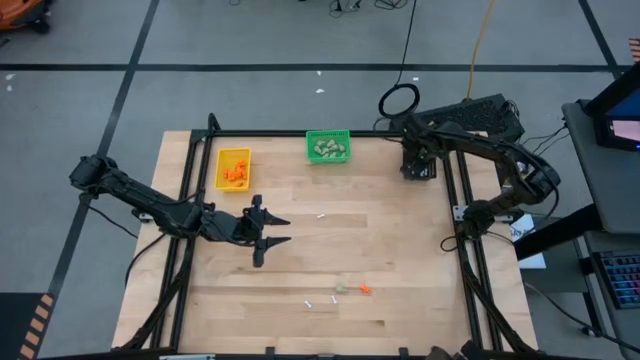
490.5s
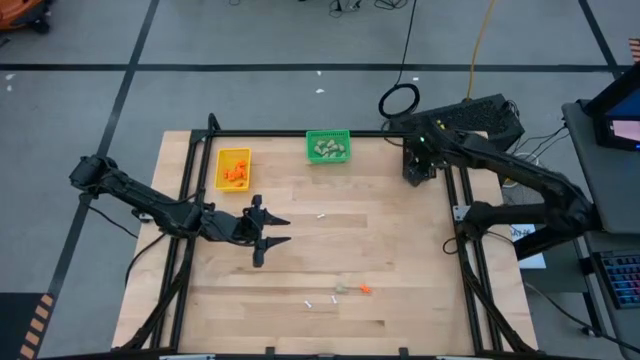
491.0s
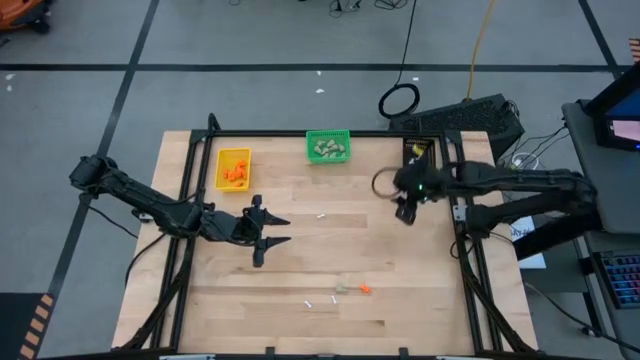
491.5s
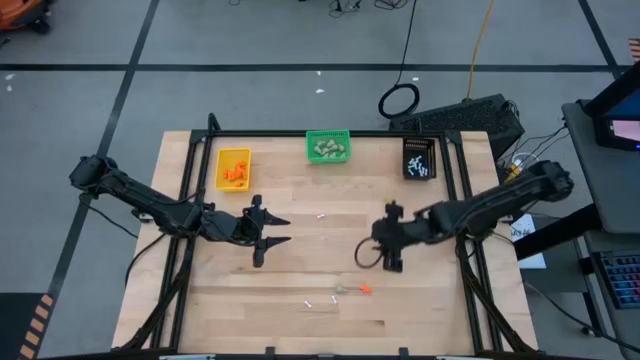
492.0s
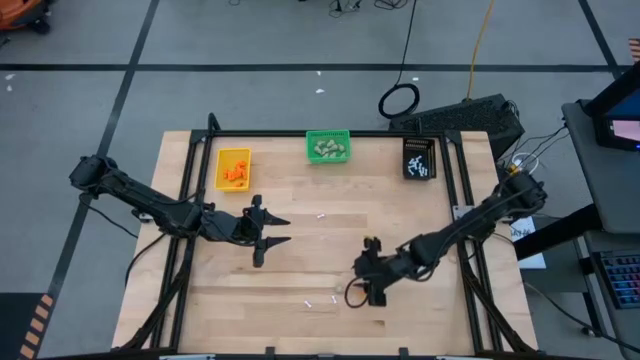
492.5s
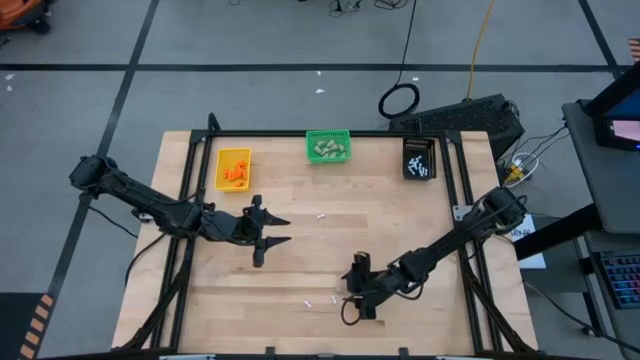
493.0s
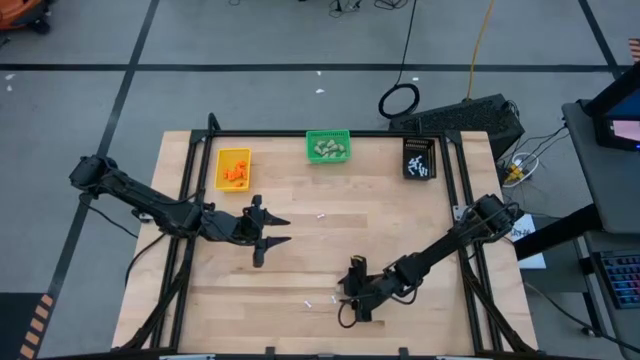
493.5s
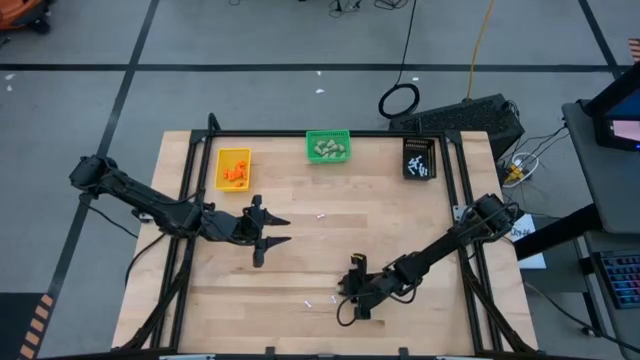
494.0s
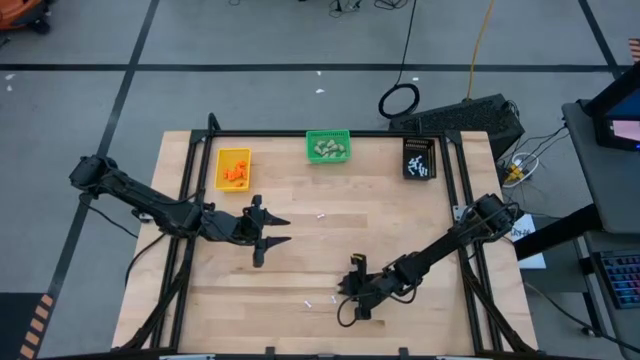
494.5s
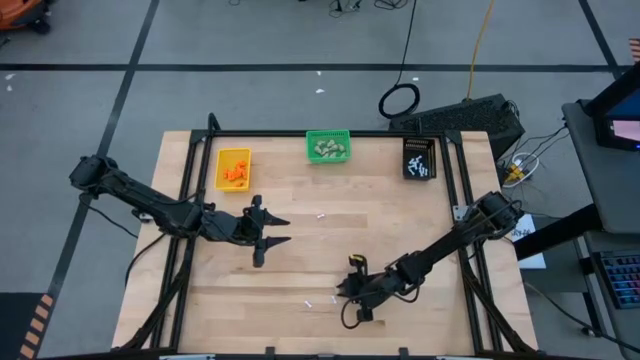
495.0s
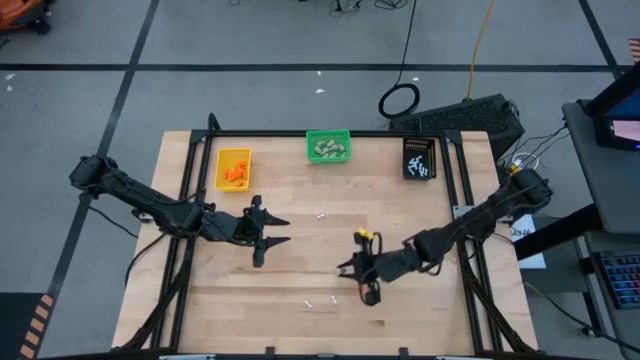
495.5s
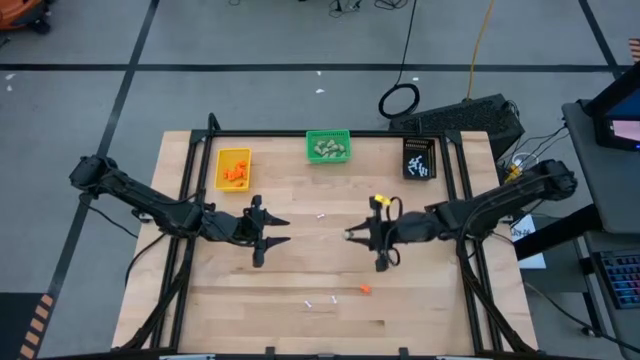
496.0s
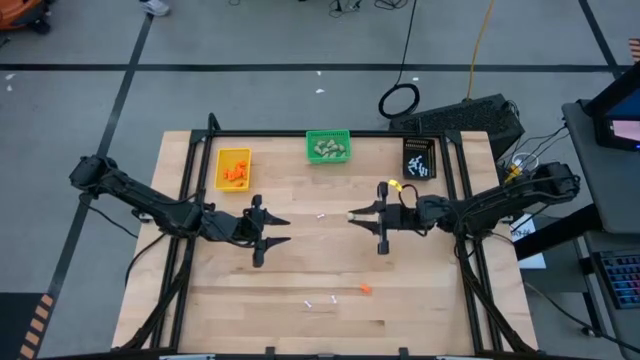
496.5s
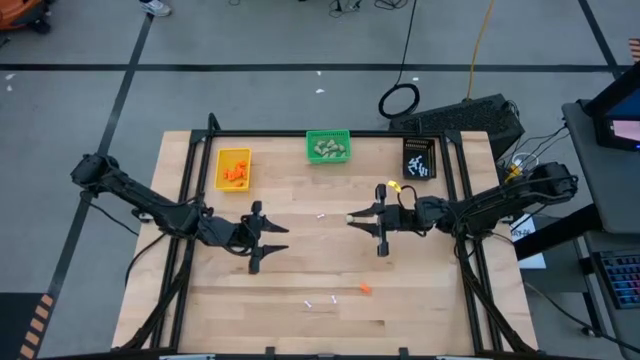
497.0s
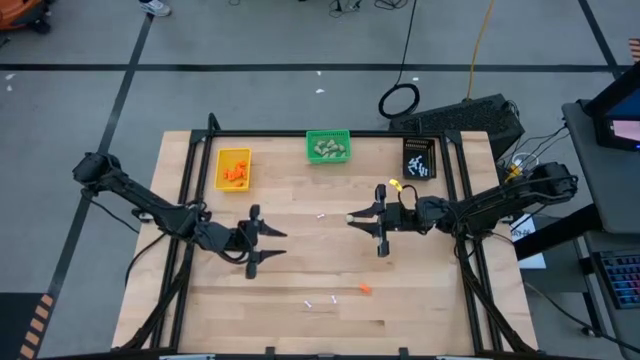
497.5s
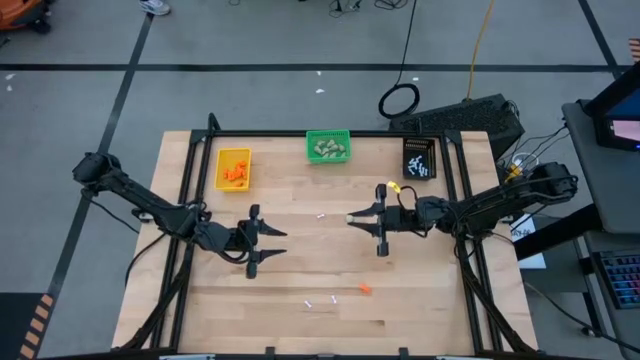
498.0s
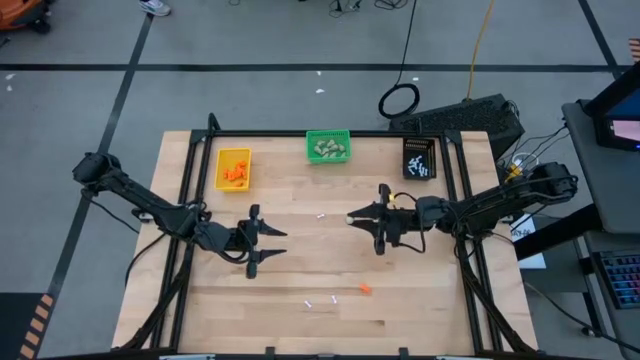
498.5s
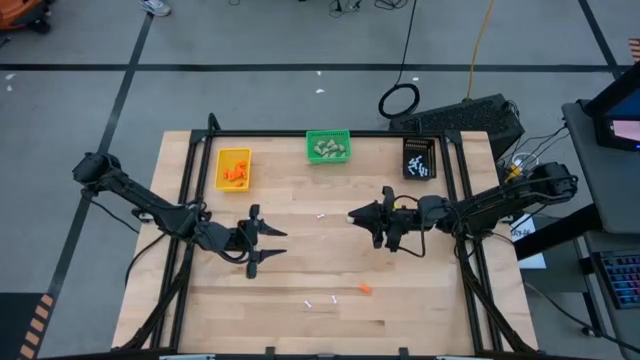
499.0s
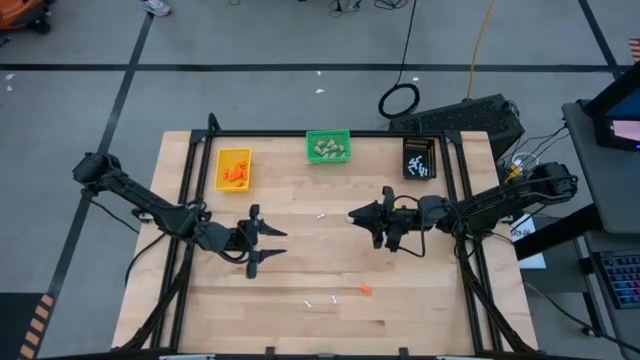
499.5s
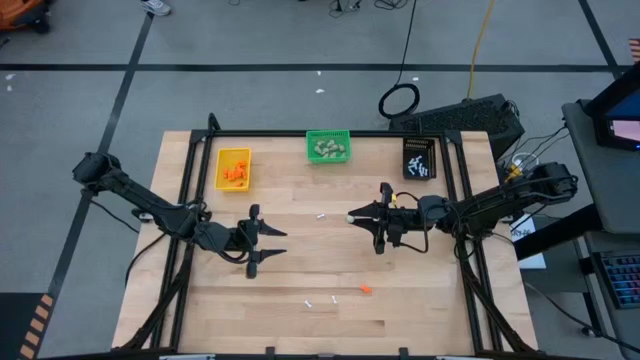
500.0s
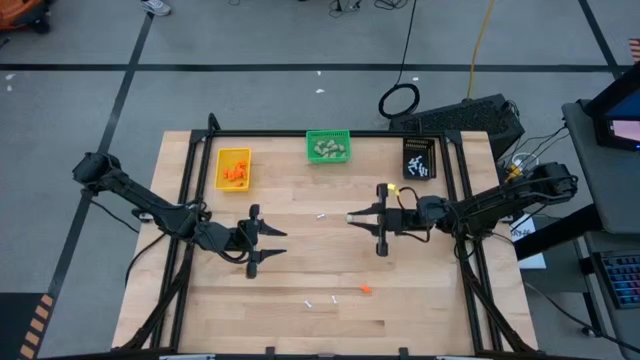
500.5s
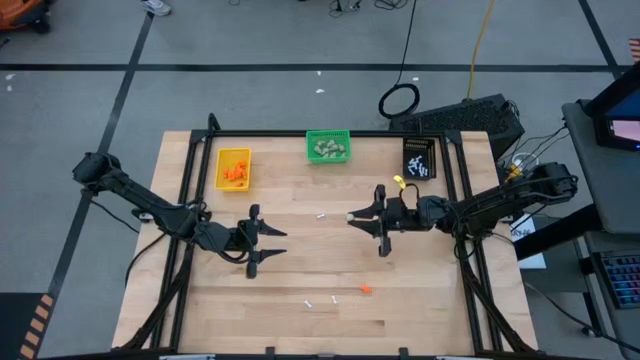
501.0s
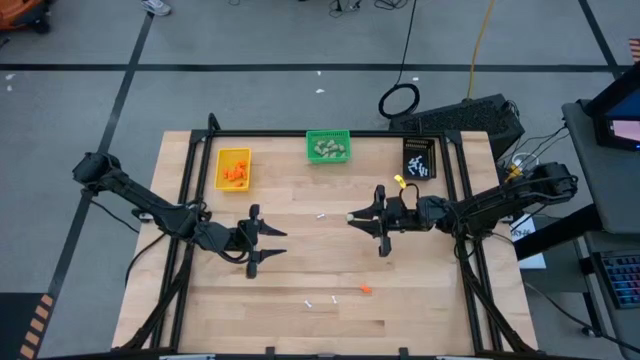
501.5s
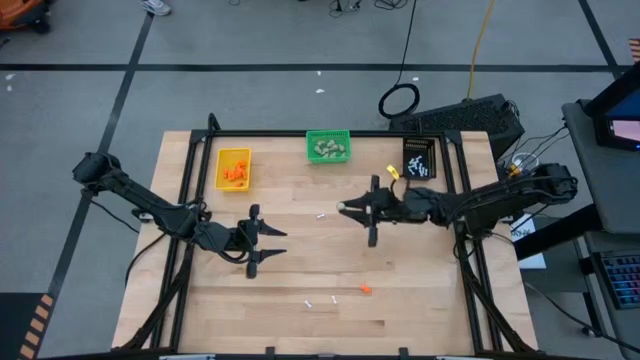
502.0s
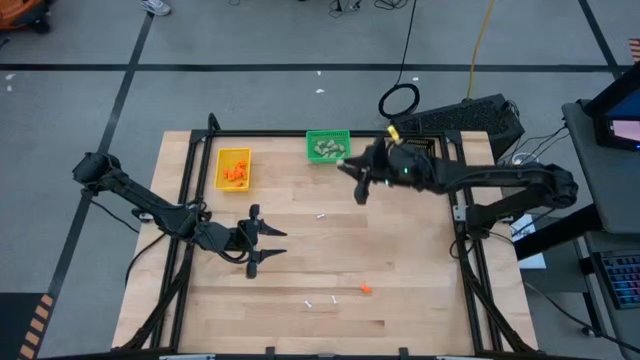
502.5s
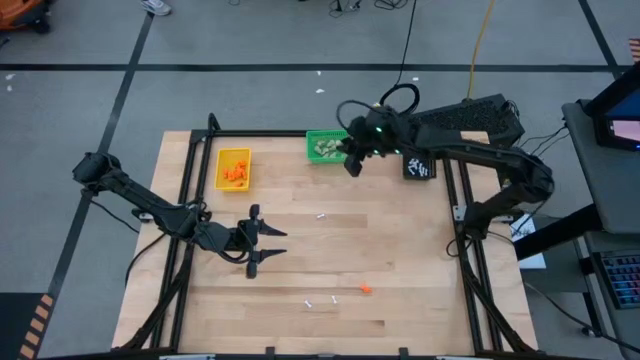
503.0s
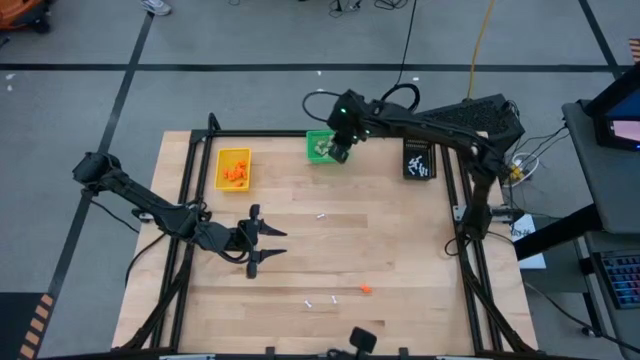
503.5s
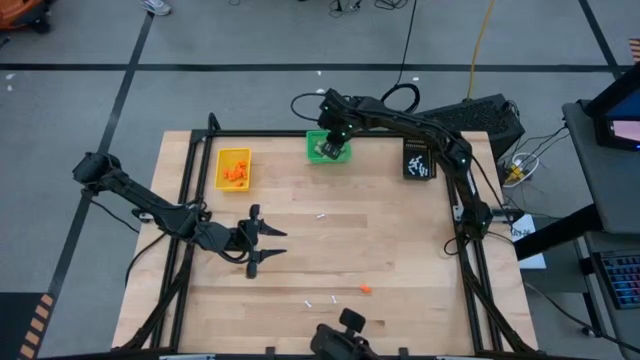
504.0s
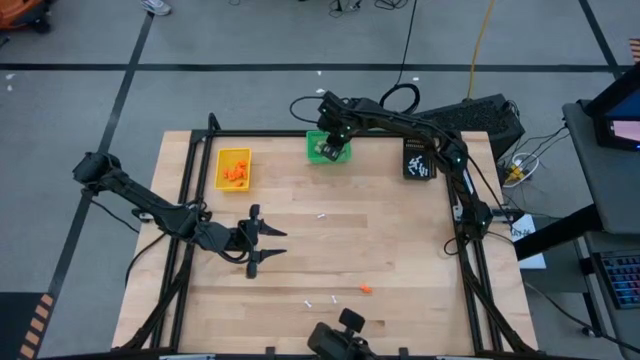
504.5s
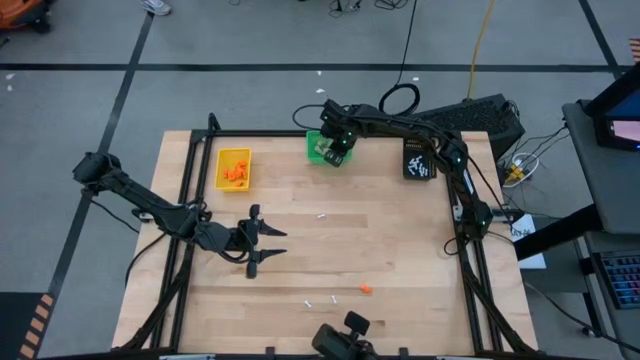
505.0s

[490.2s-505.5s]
Task: Sort Halloween decoration
Put the gray skull toy into the green bin

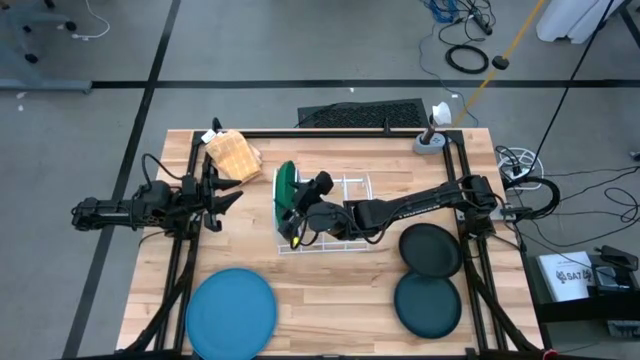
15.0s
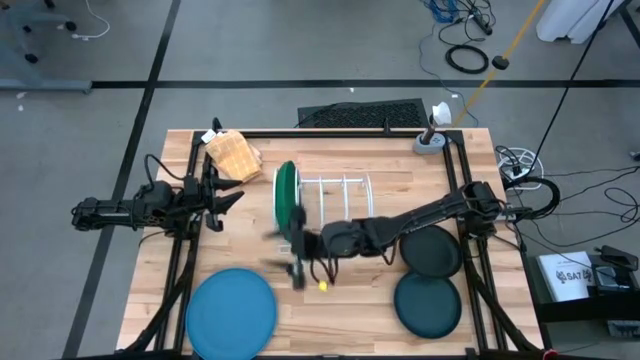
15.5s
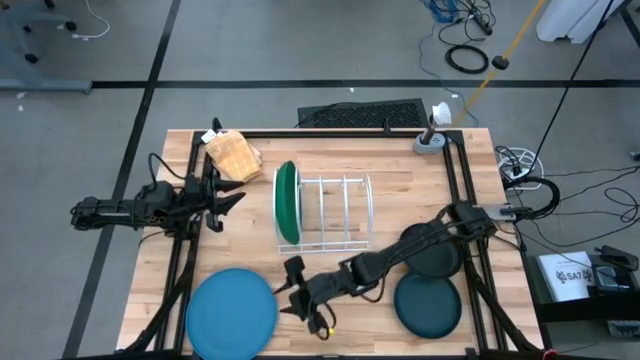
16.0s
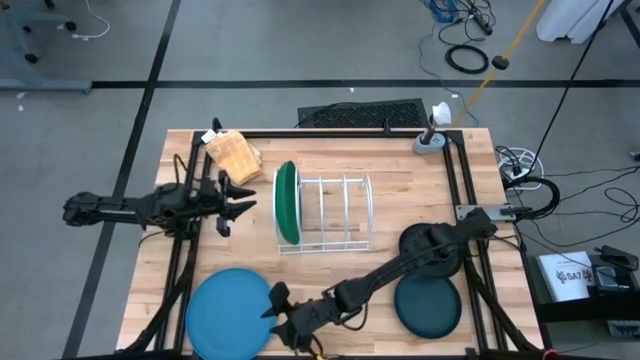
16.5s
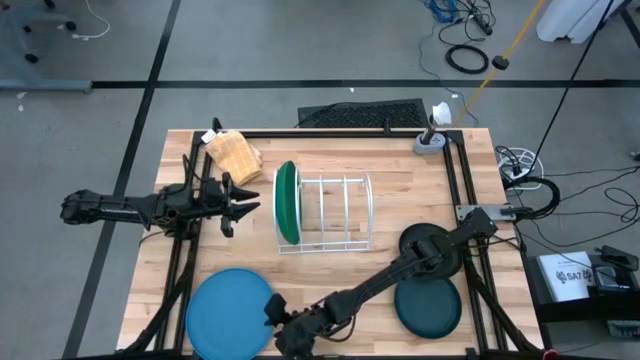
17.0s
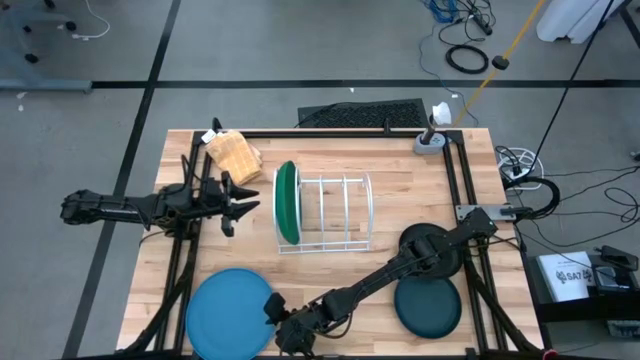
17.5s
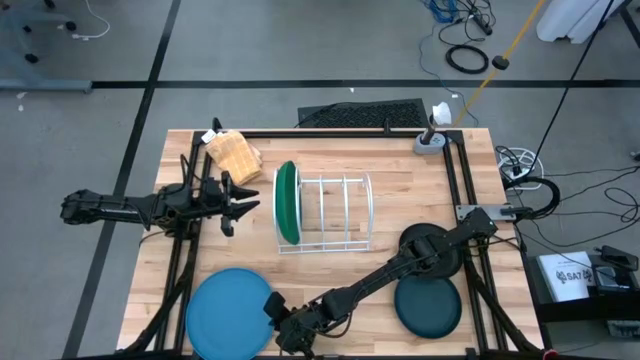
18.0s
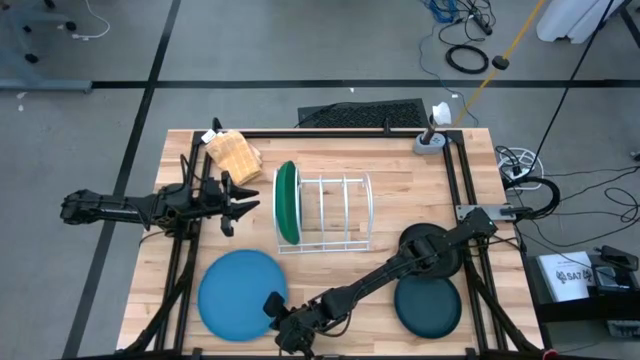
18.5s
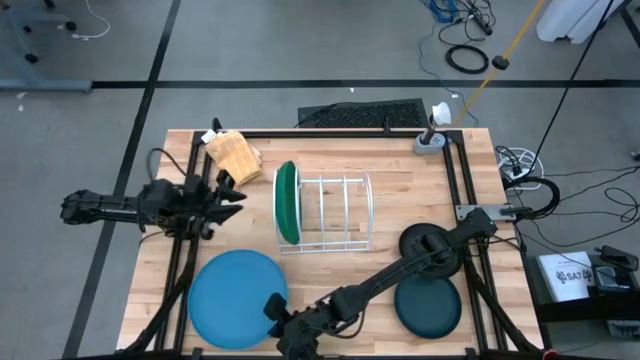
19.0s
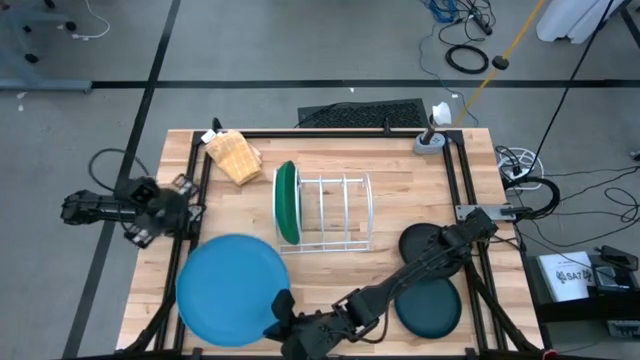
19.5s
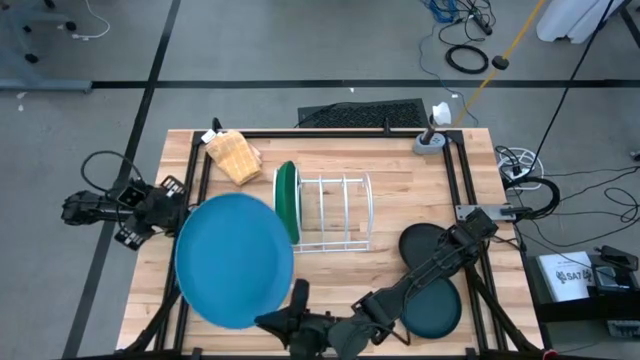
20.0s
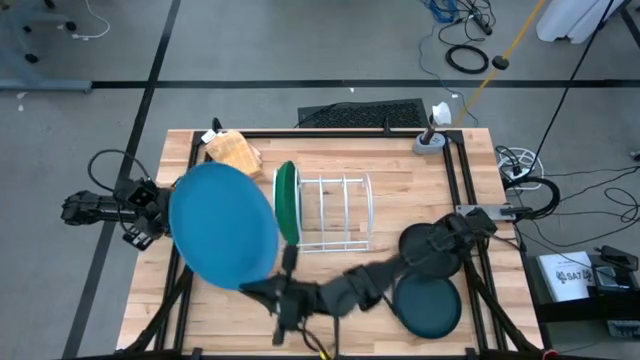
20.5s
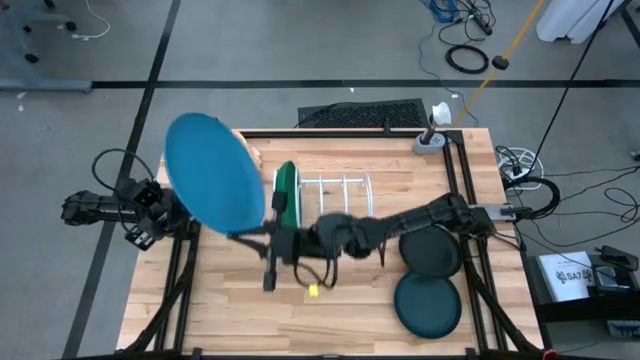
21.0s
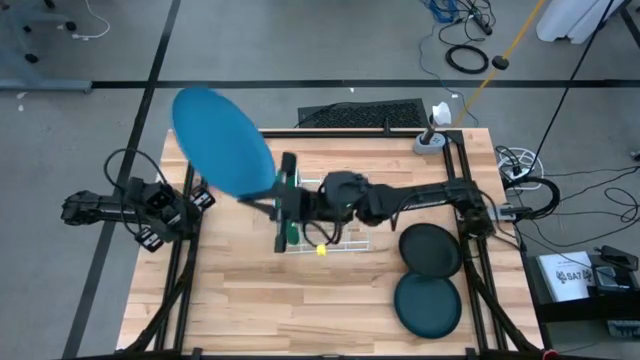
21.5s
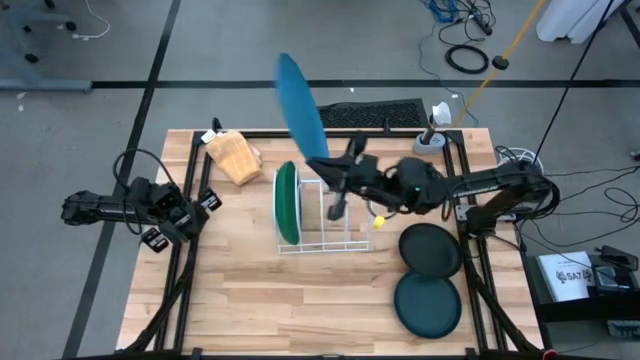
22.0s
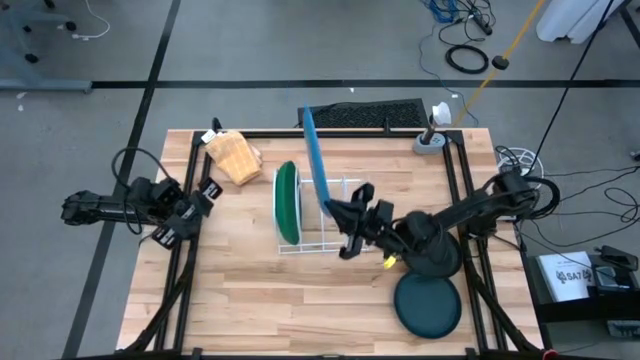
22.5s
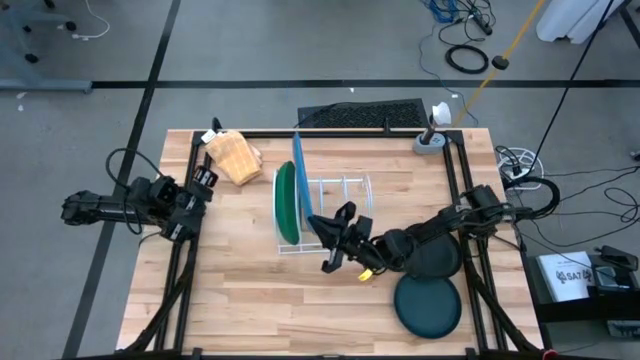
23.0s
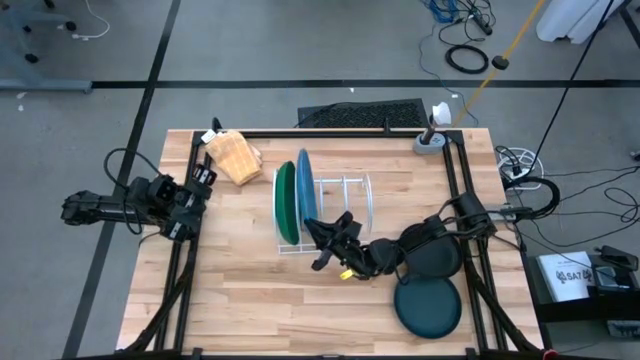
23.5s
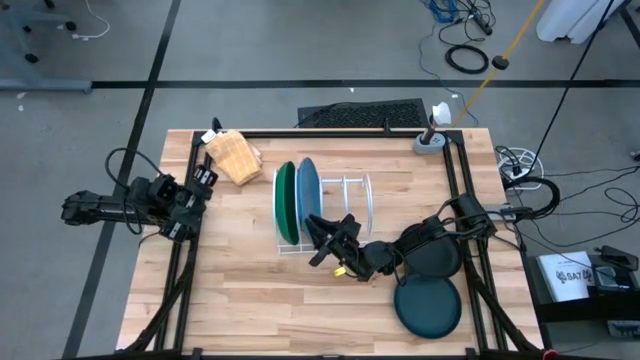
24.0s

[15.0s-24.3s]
Task: Sort dishes
Put the blue plate in the dish rack
